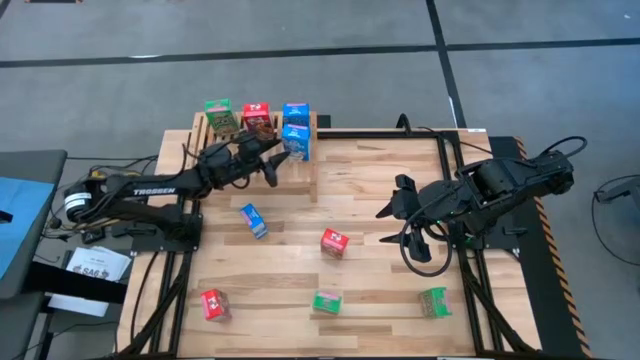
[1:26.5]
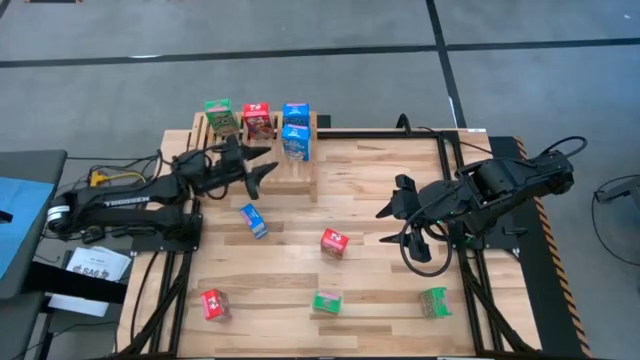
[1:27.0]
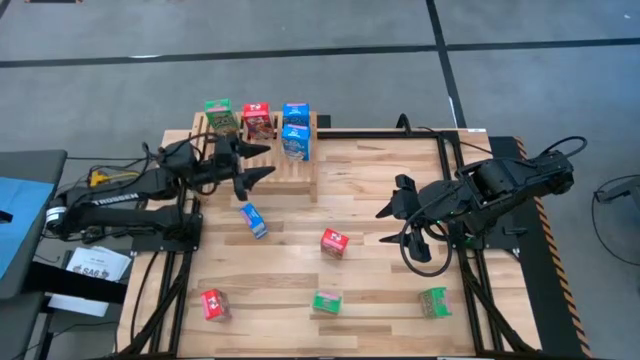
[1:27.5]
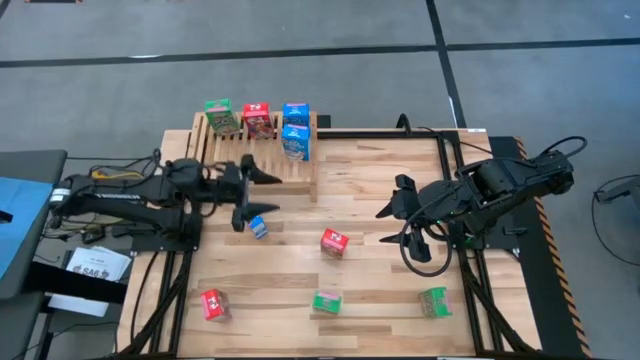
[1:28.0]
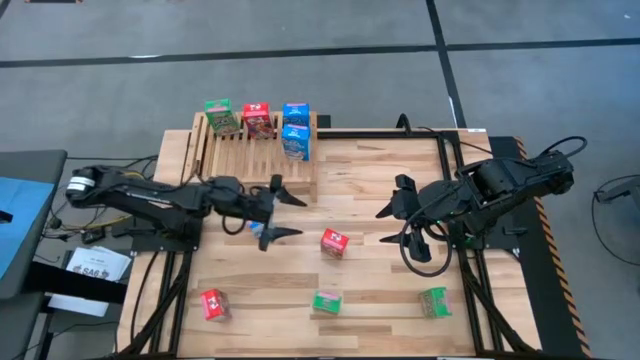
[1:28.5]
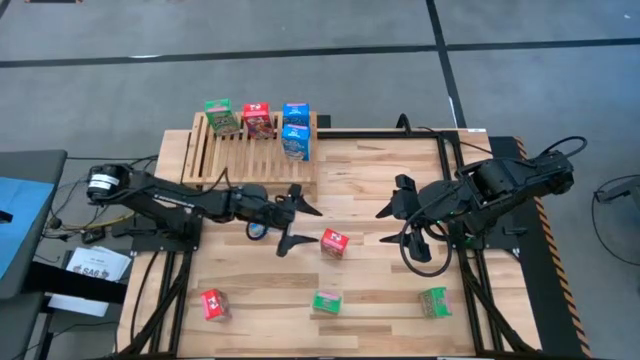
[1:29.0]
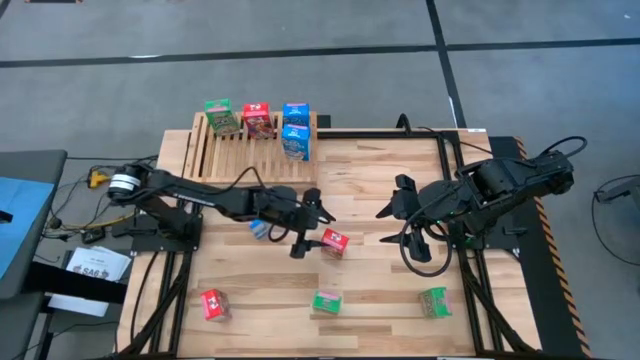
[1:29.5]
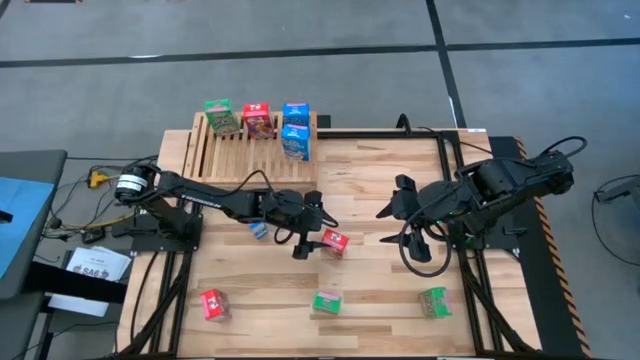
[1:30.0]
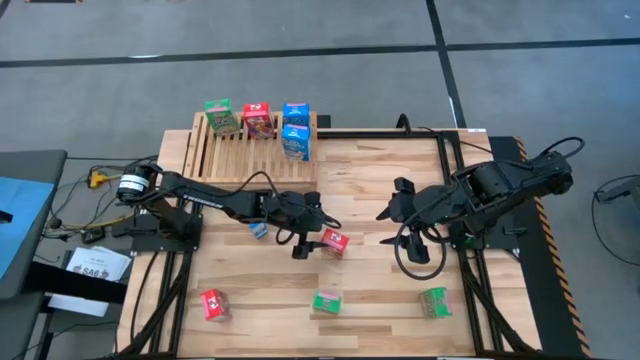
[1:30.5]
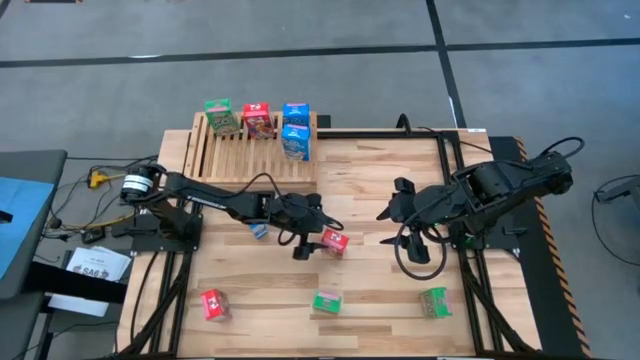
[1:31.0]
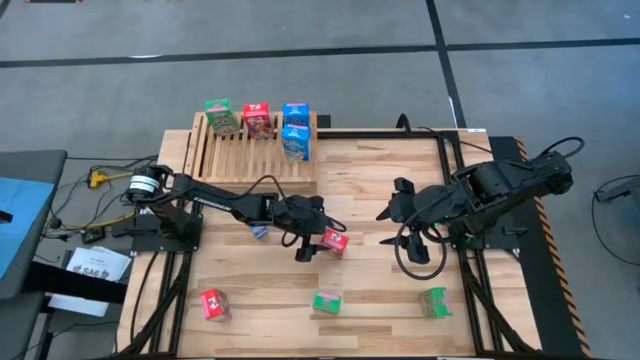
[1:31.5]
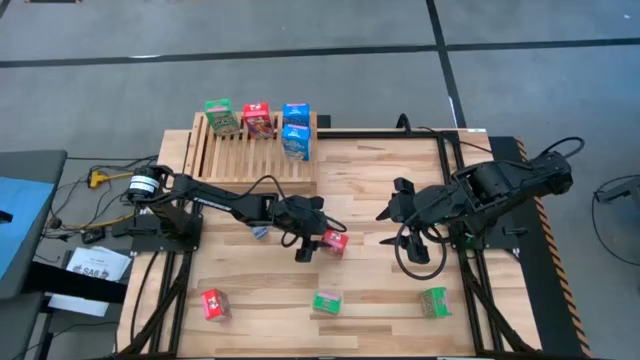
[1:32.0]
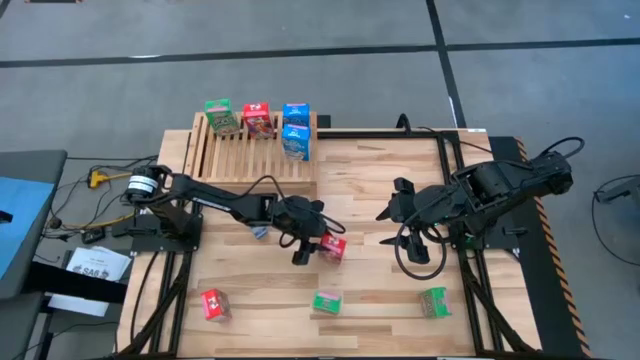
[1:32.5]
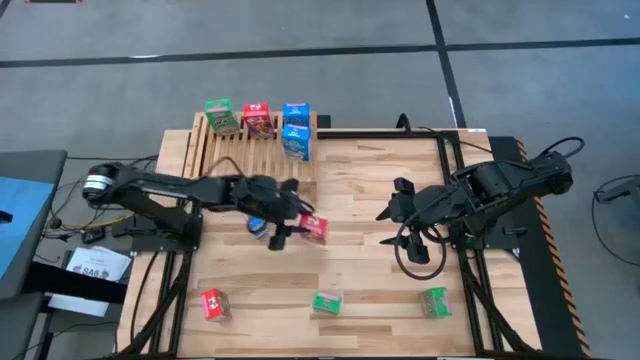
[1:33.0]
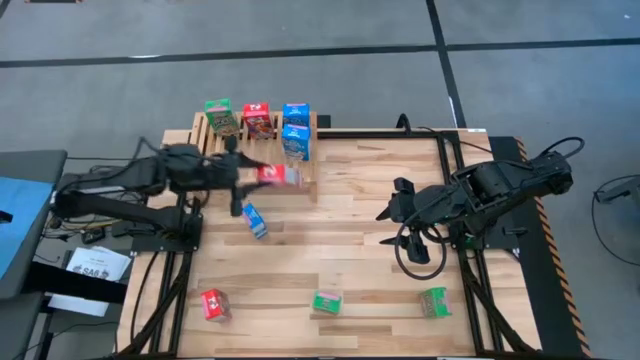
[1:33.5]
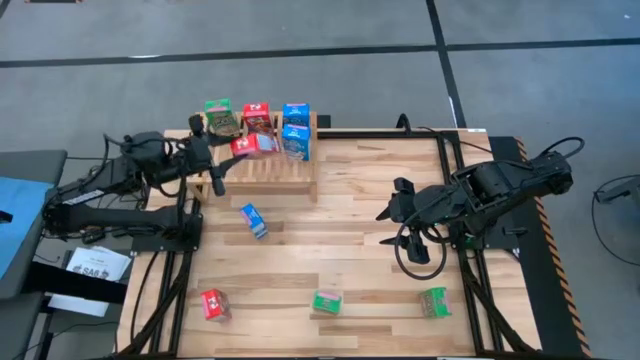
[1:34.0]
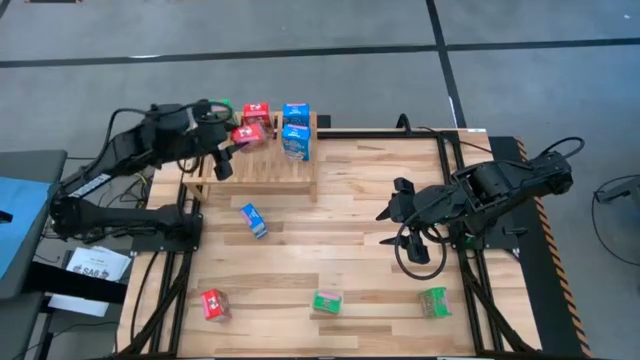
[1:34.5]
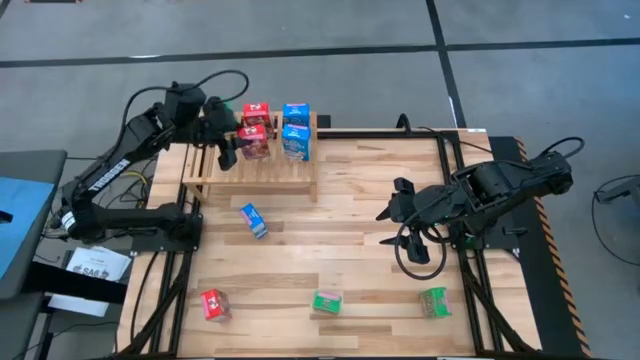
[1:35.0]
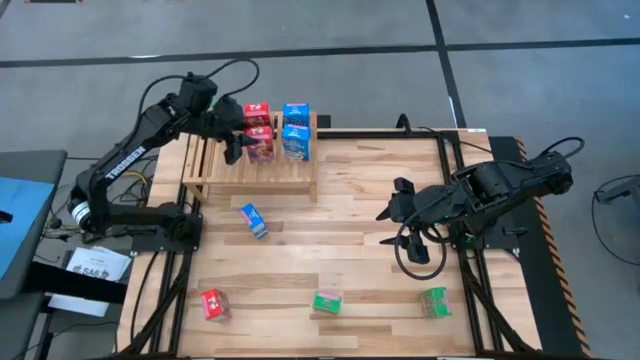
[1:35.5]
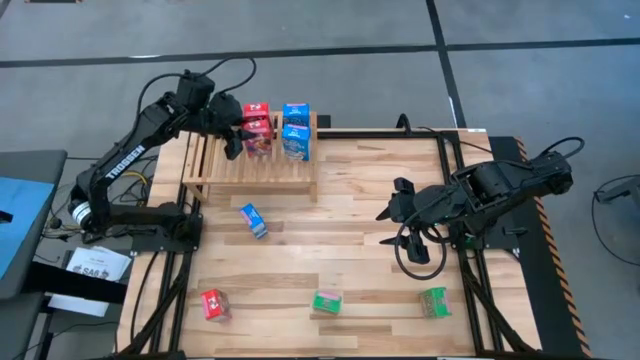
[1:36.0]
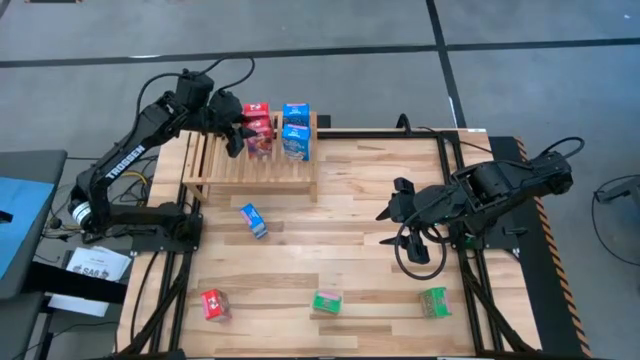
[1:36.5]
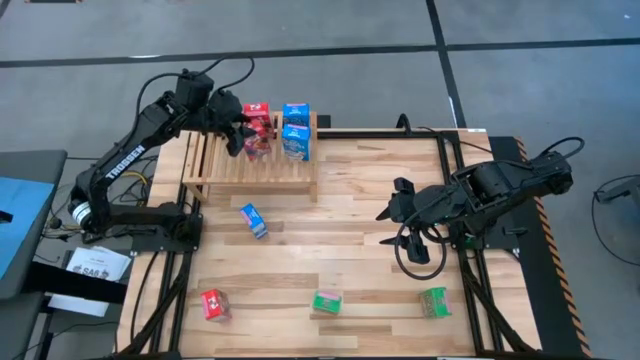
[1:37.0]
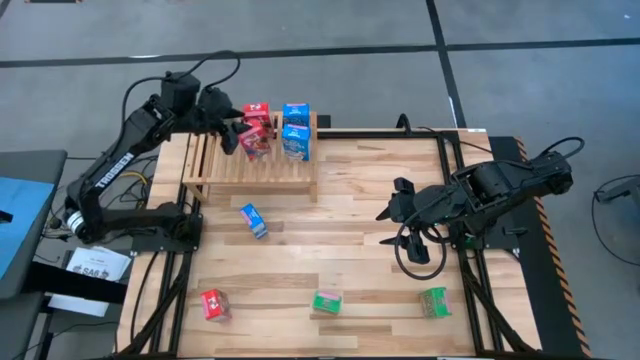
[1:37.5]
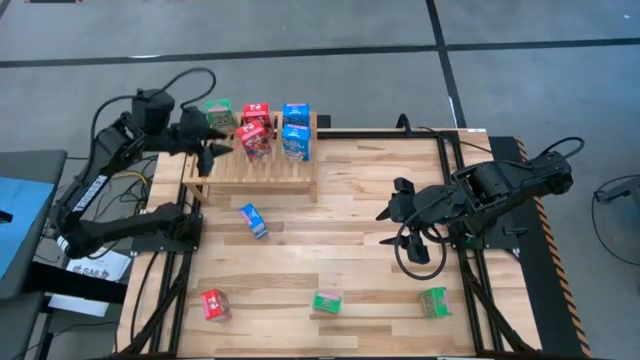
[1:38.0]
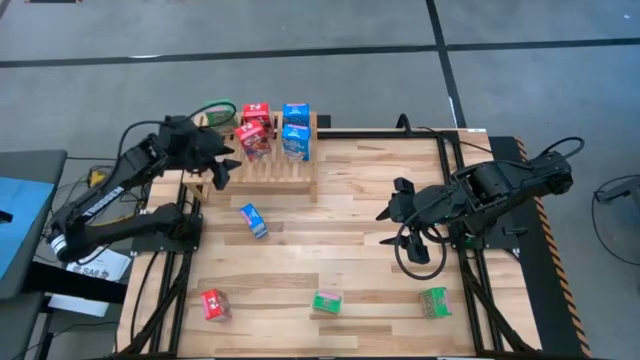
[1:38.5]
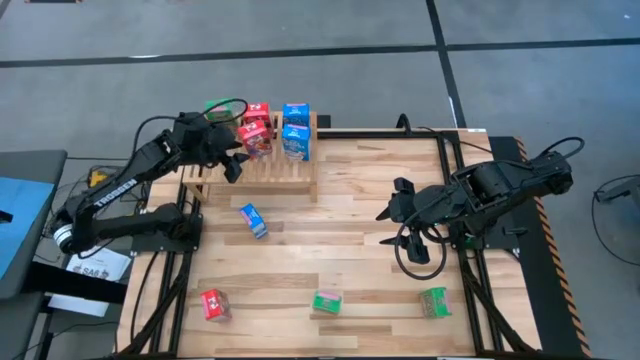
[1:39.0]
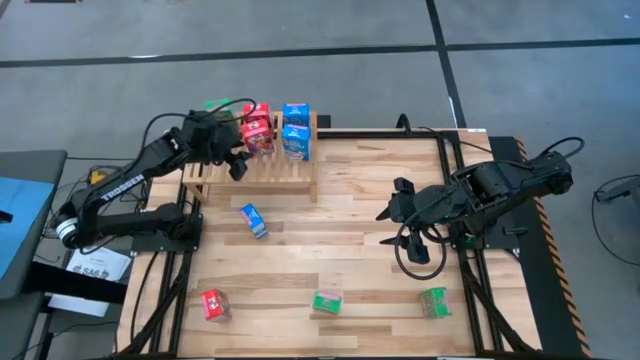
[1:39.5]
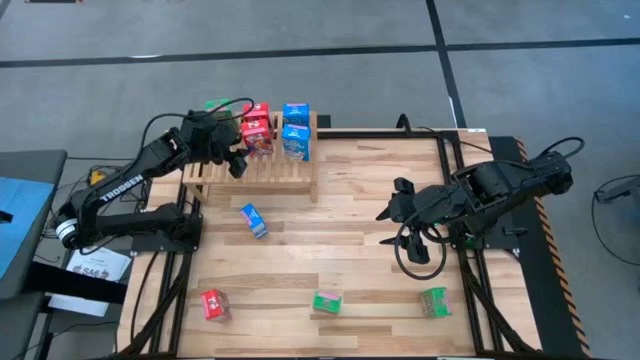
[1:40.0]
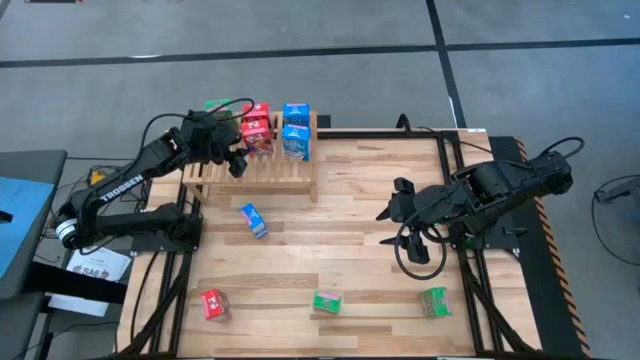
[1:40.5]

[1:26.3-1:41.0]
Task: Stack cereal on shelf
Put the top red cereal box on the shelf aligned with the other red cereal box

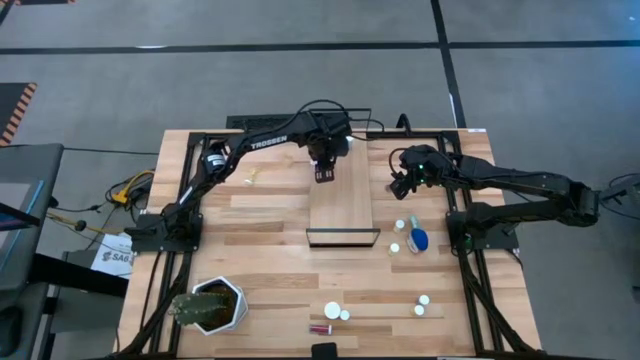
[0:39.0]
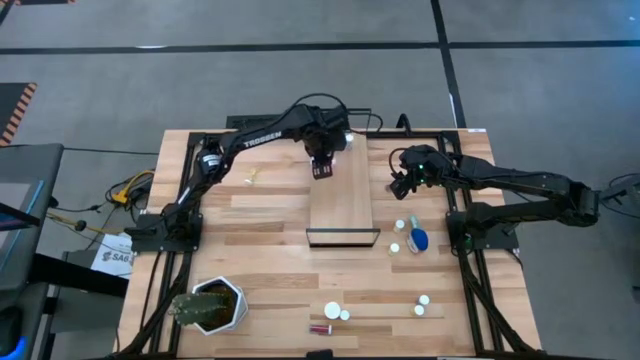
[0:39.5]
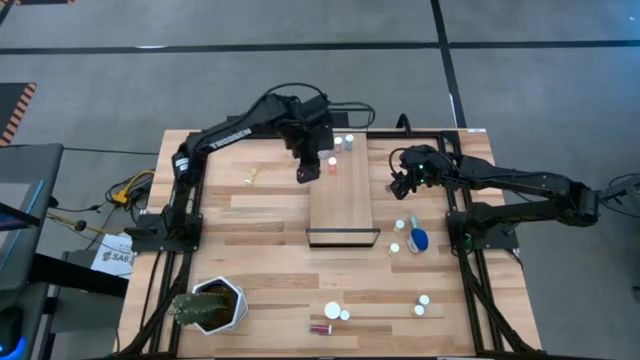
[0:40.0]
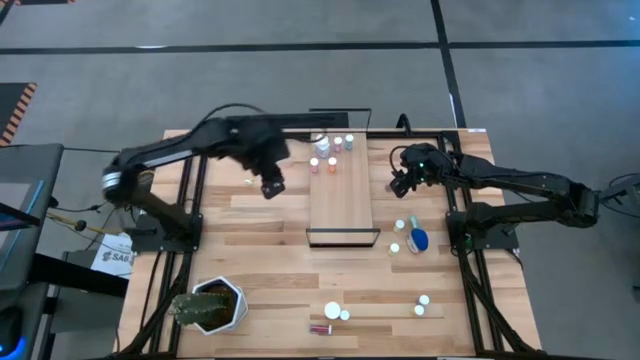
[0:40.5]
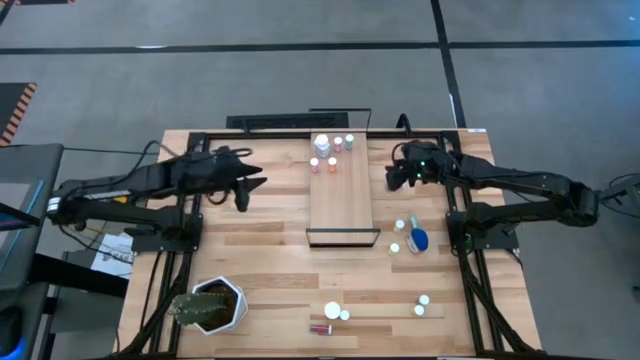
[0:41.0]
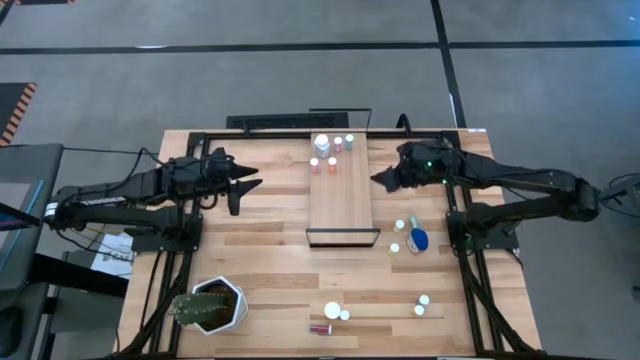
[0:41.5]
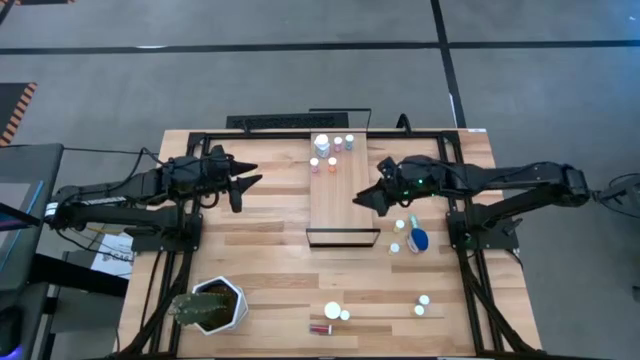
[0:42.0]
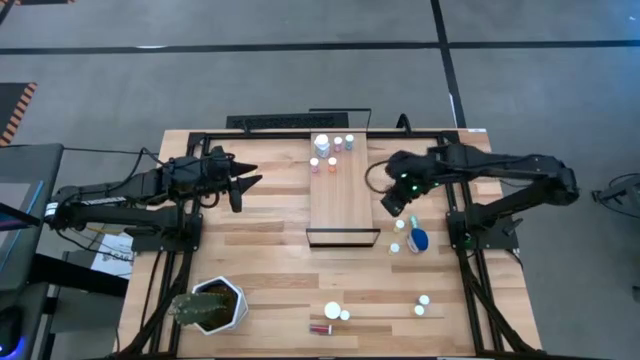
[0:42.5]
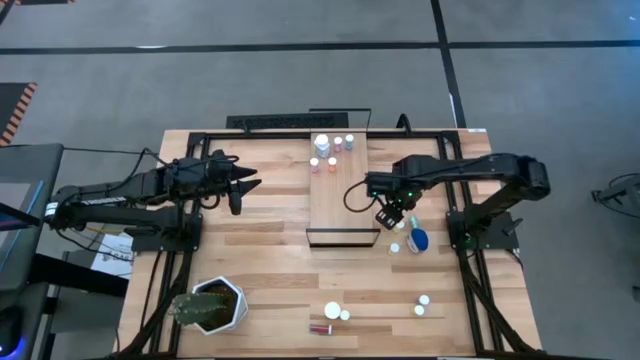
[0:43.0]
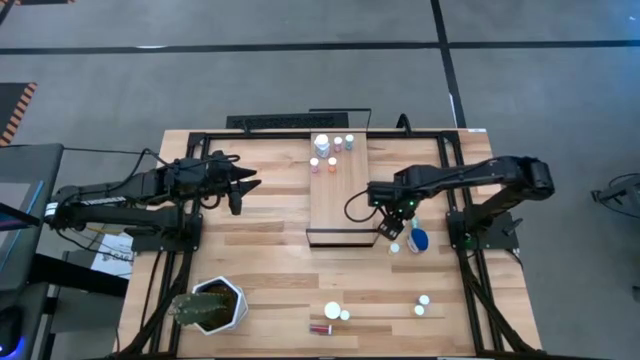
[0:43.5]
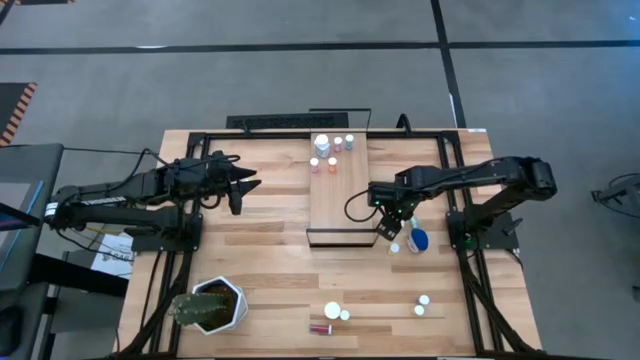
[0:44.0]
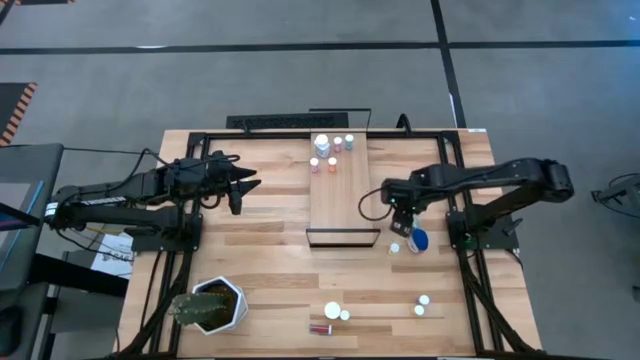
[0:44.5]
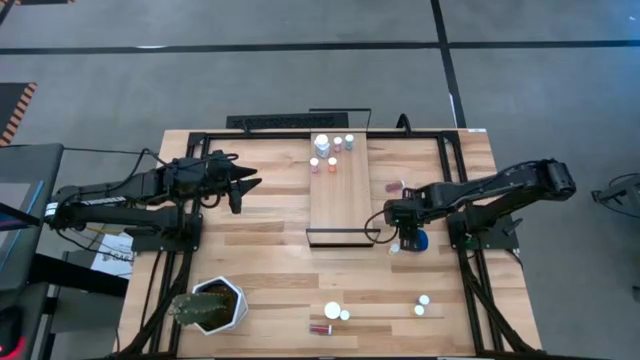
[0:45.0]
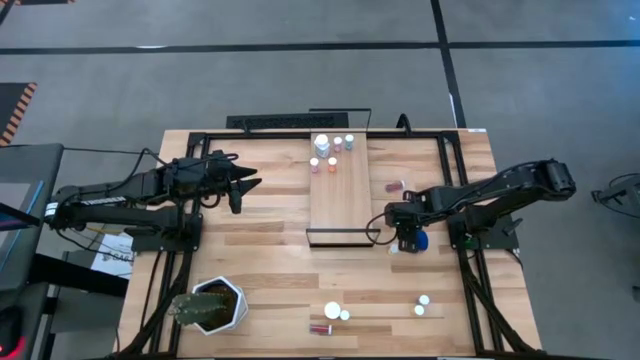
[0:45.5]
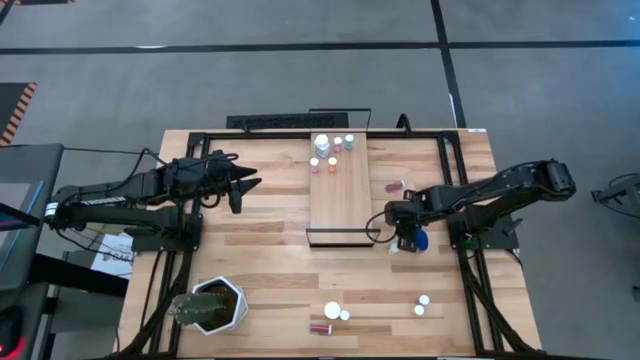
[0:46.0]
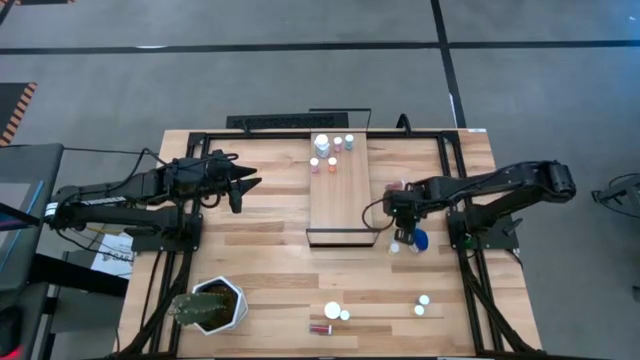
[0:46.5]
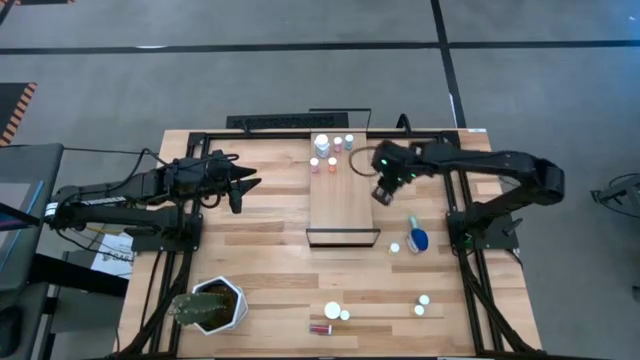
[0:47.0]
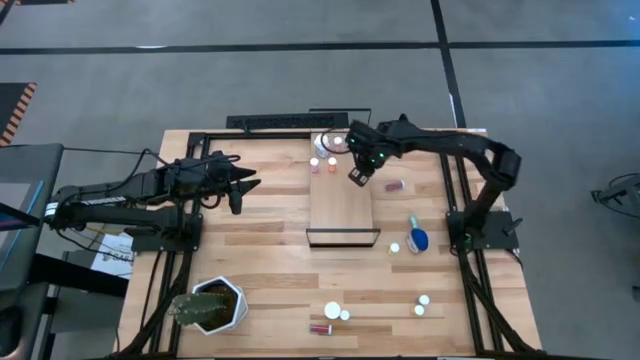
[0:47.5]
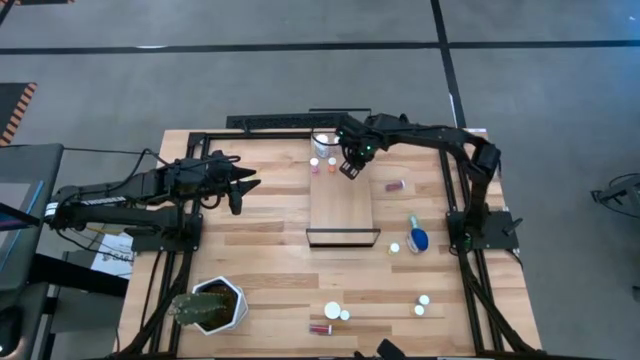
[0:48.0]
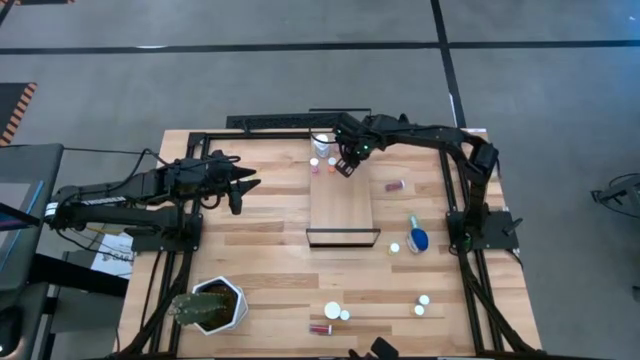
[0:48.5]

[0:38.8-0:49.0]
Task: Pick and place medicine bottles onto shelf by color
Put the yellow pill bottle on the shelf
